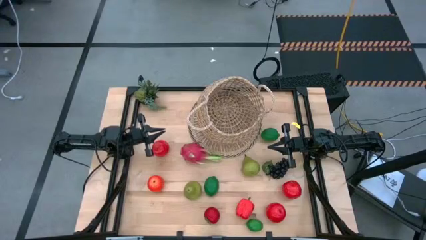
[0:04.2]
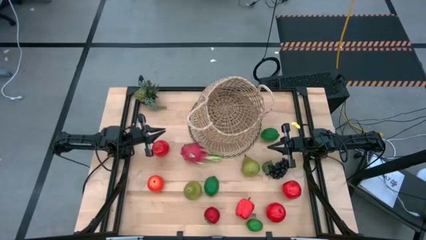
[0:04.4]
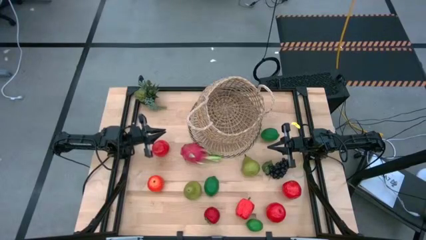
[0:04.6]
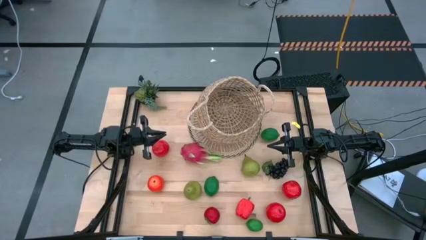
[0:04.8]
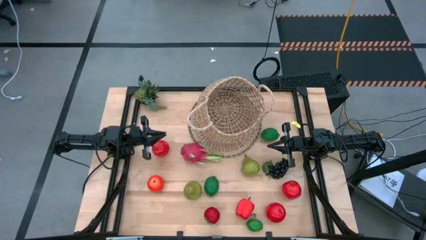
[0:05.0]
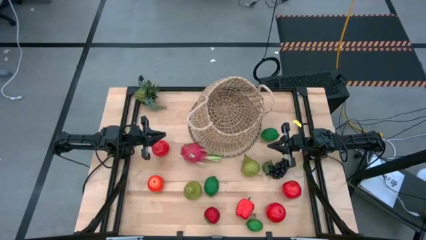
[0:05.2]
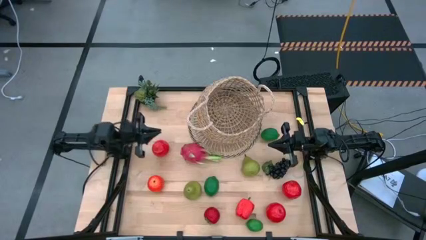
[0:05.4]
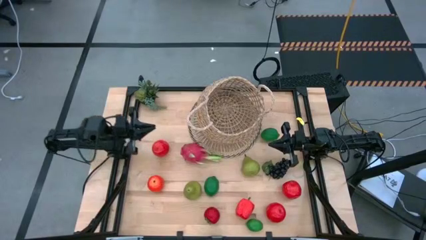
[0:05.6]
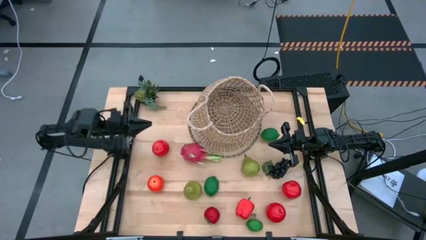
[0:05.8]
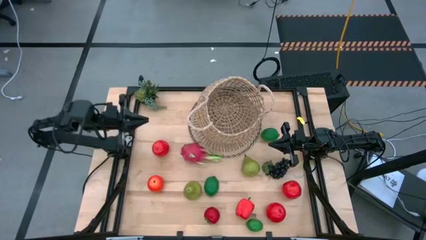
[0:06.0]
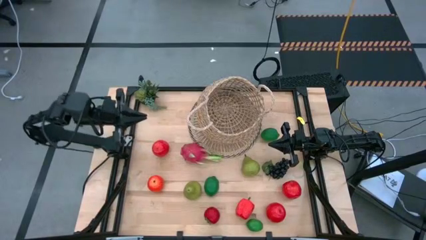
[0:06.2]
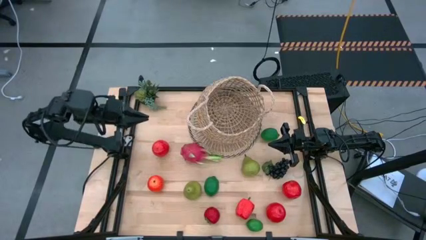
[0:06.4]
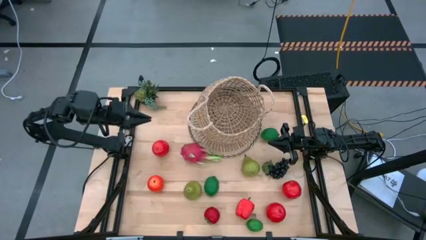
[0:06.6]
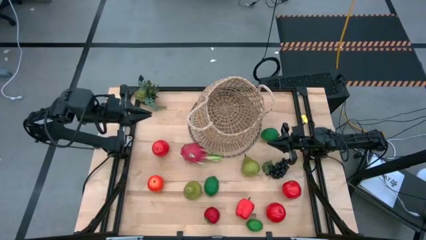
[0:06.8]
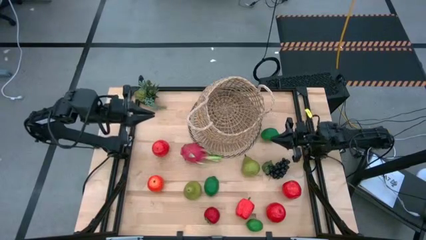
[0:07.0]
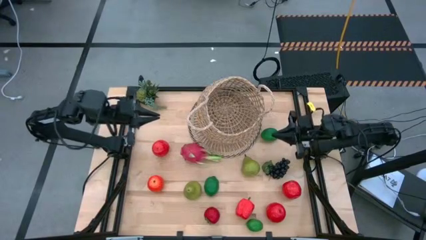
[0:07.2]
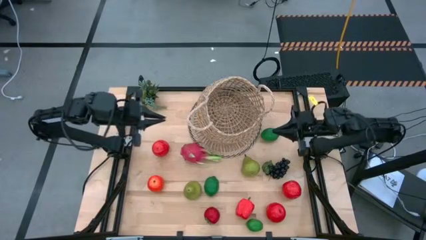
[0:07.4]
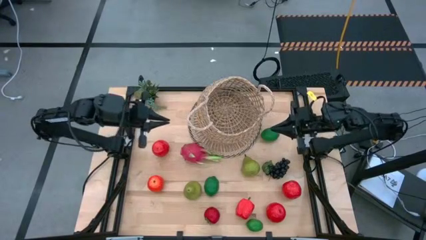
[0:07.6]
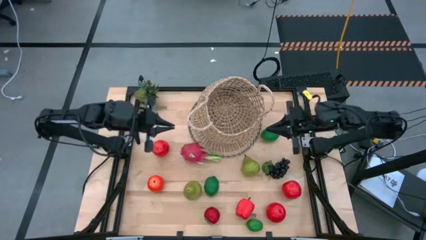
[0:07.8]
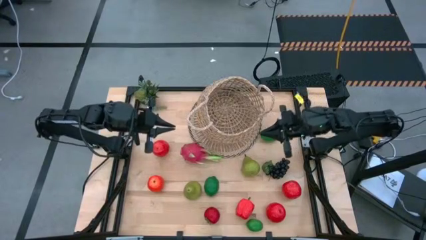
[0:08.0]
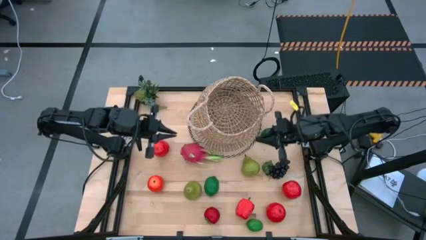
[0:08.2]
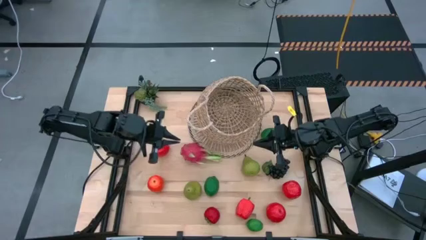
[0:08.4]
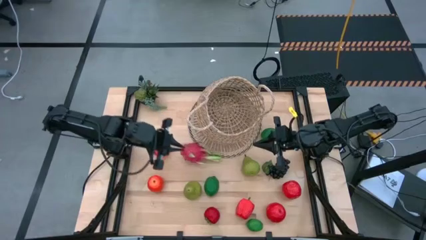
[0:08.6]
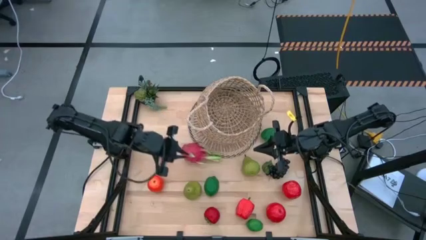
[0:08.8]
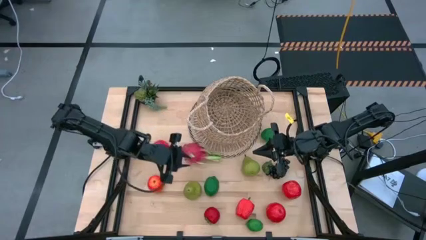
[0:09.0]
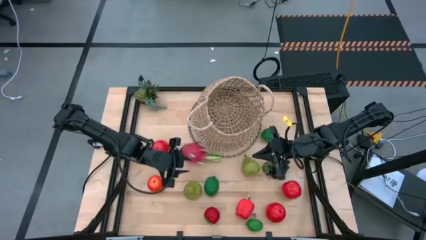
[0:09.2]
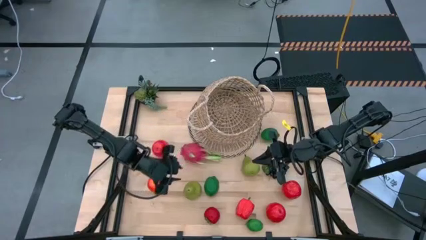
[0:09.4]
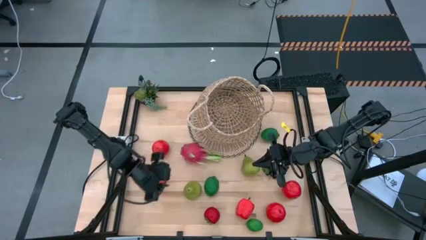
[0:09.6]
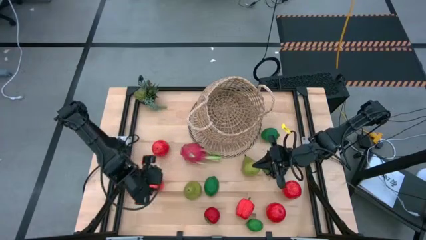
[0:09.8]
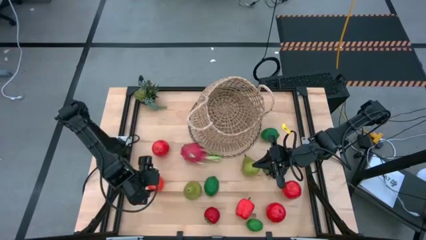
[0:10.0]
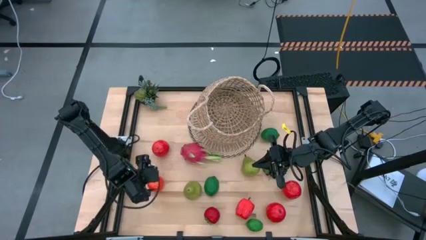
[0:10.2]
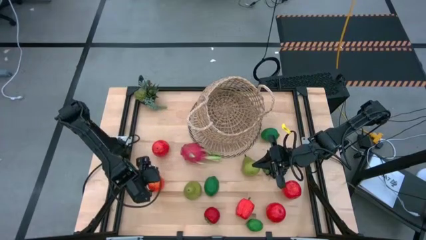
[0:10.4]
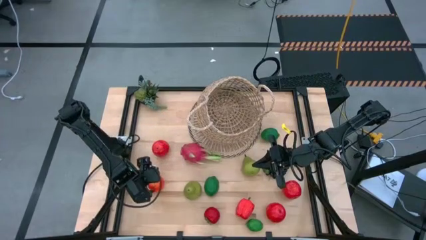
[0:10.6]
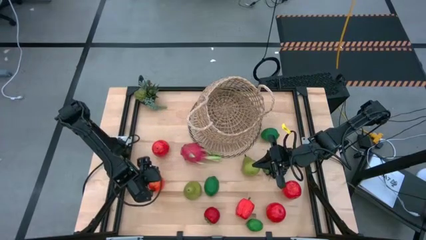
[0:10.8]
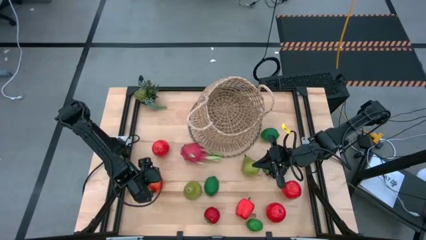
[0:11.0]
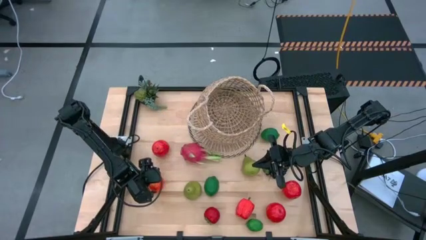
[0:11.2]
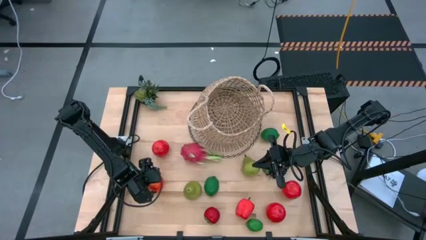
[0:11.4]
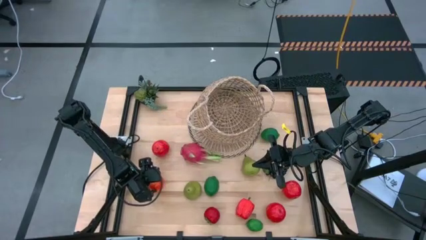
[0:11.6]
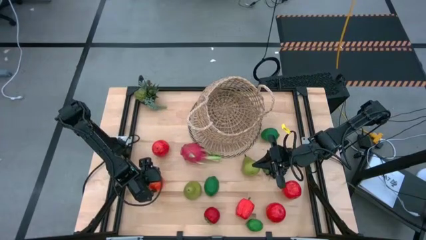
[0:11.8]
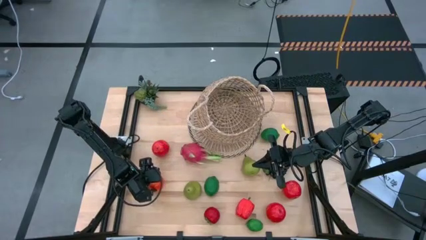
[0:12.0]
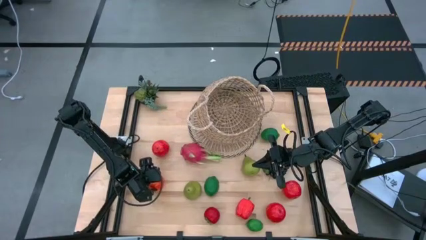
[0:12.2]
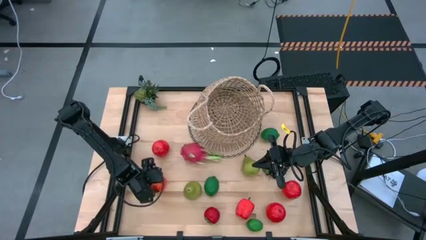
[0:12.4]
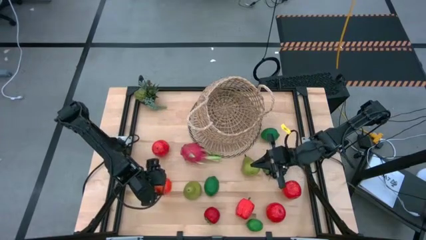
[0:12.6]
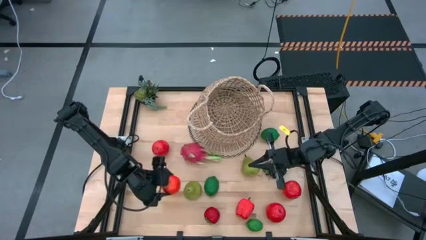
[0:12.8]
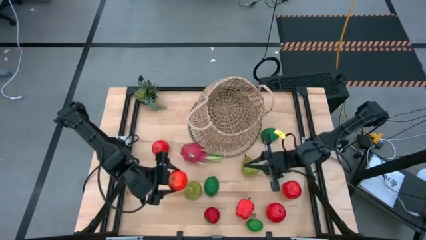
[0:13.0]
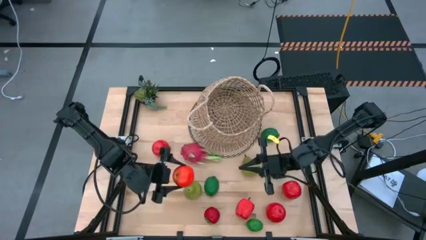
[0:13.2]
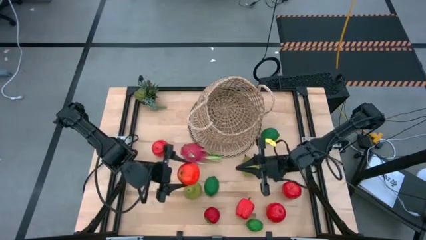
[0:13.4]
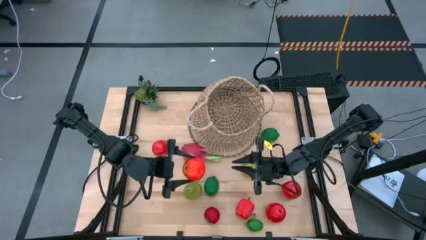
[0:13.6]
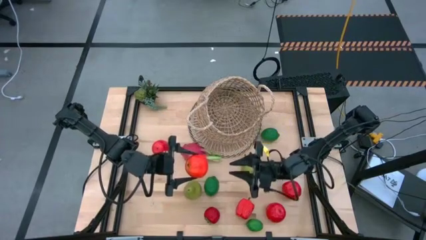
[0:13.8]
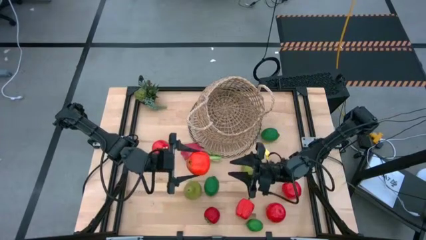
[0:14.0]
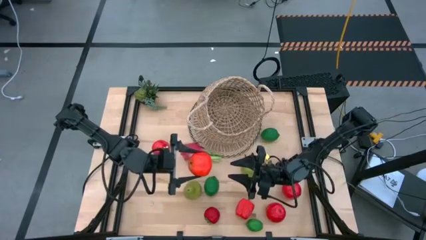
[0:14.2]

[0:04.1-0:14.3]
Task: Build produce basket
Put the red apple into the basket
